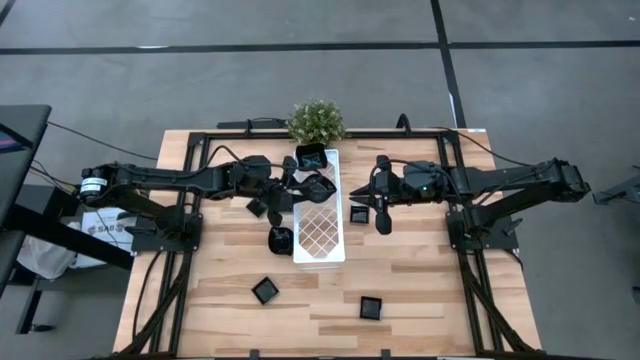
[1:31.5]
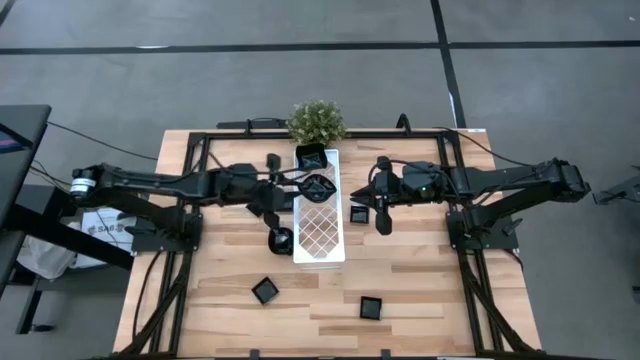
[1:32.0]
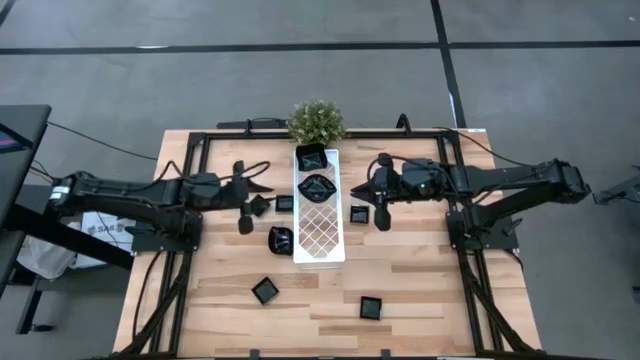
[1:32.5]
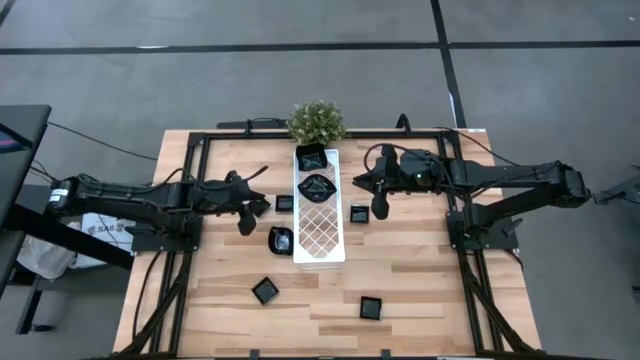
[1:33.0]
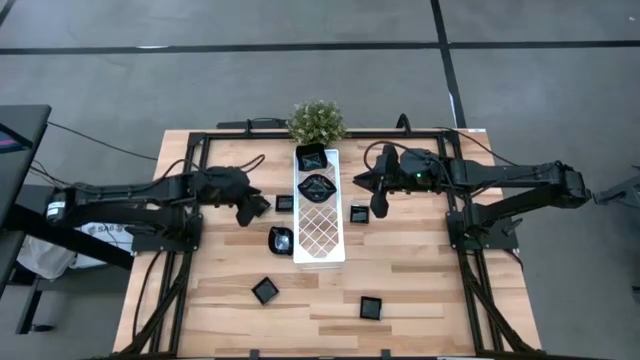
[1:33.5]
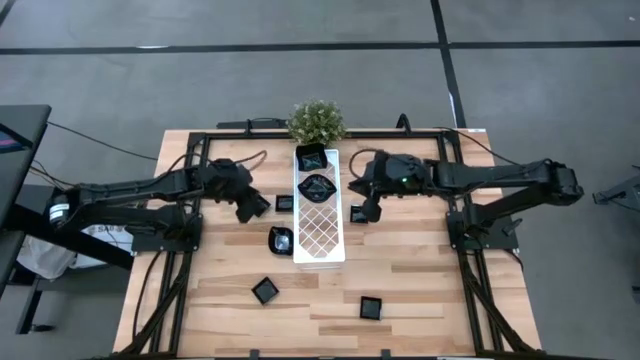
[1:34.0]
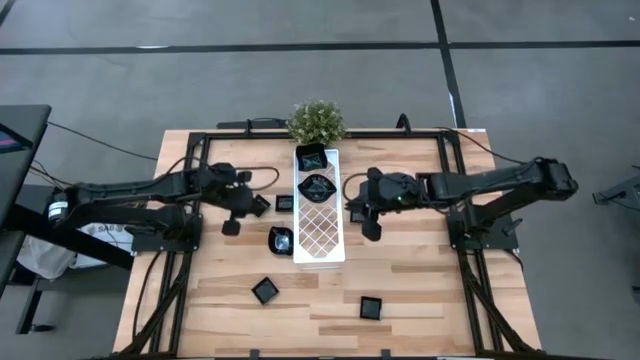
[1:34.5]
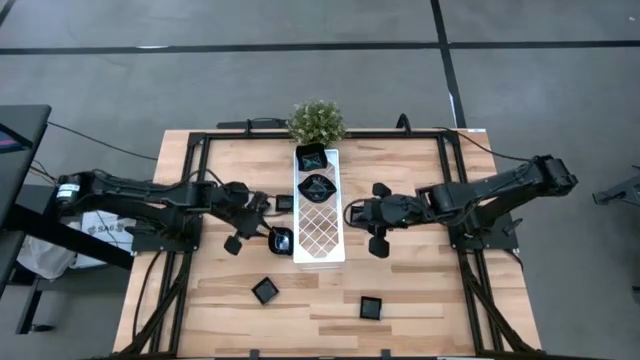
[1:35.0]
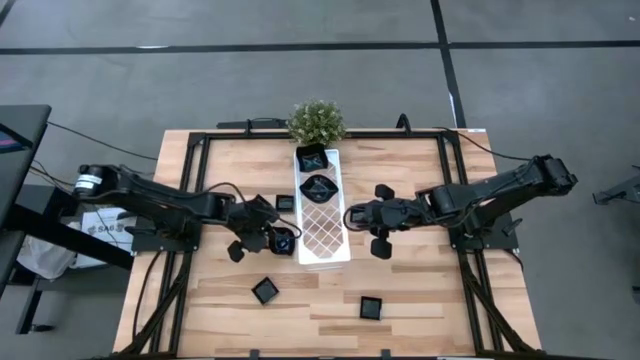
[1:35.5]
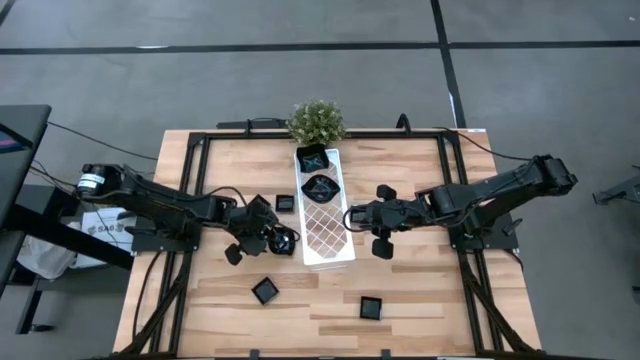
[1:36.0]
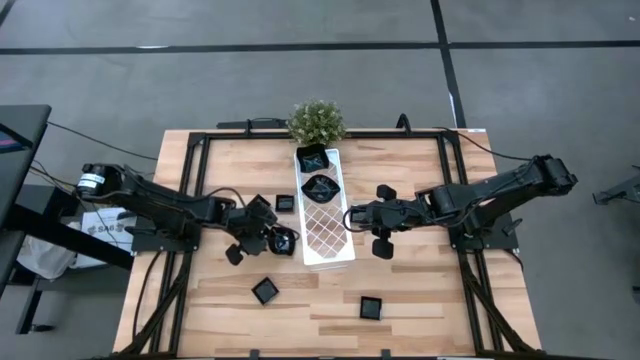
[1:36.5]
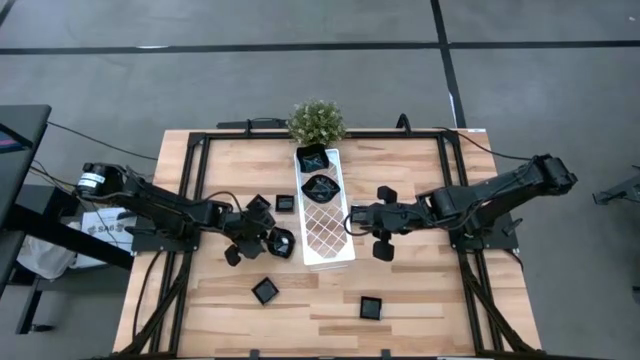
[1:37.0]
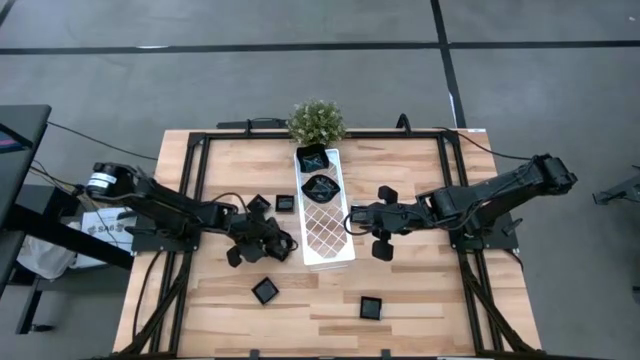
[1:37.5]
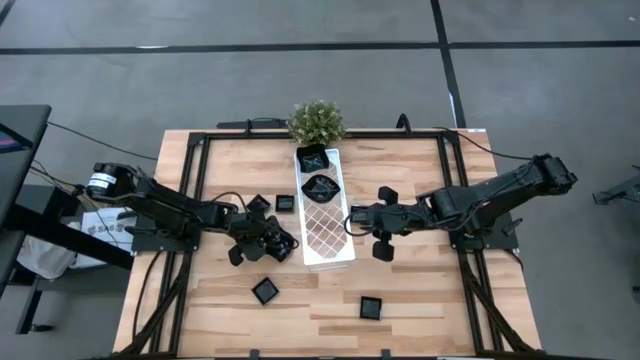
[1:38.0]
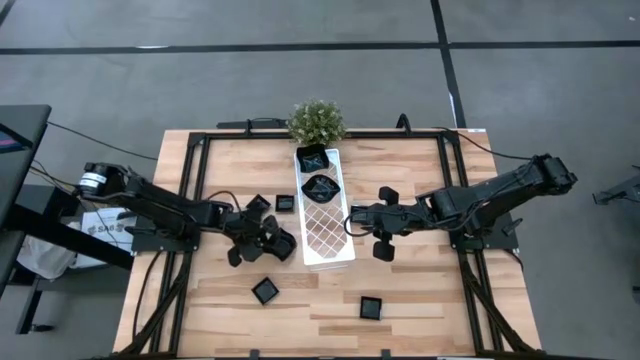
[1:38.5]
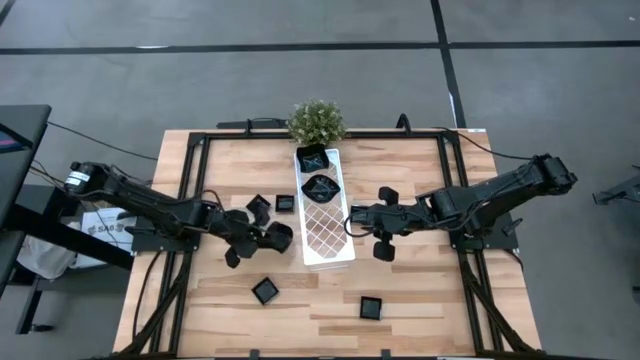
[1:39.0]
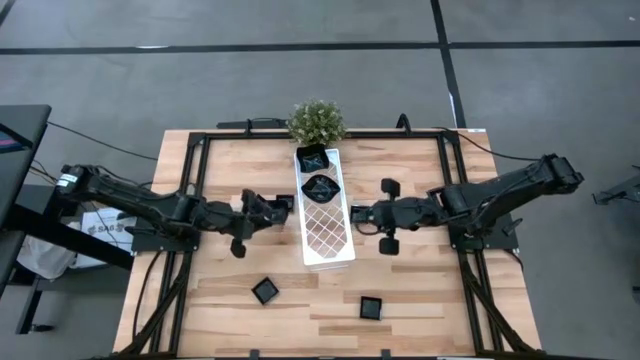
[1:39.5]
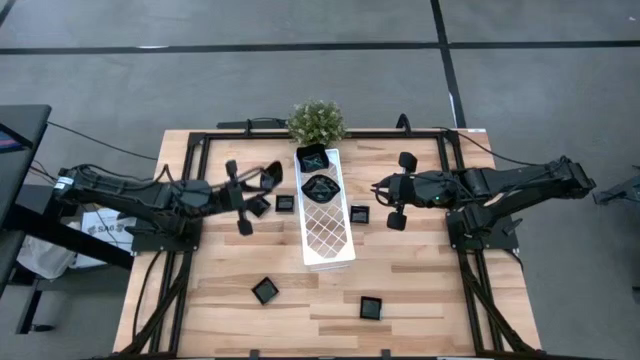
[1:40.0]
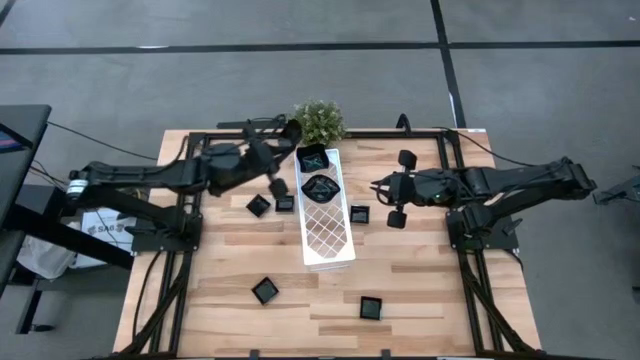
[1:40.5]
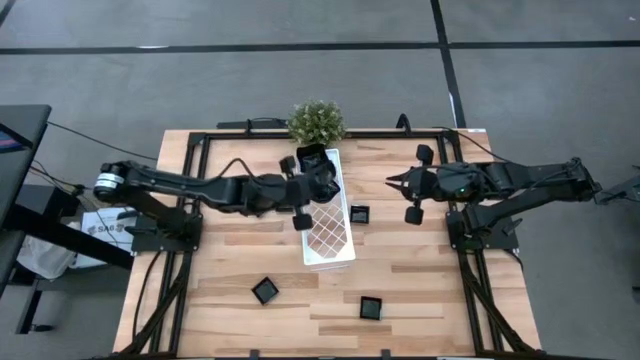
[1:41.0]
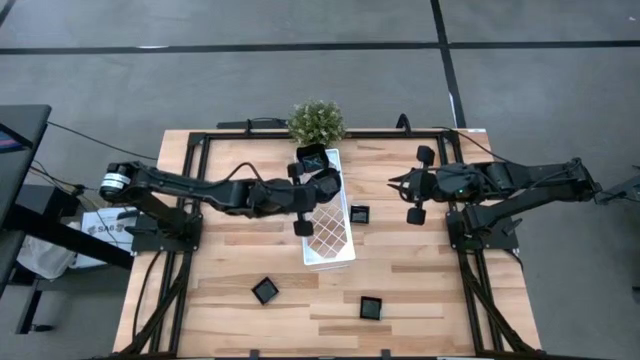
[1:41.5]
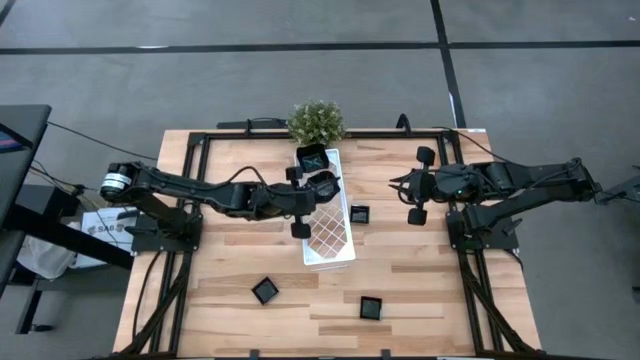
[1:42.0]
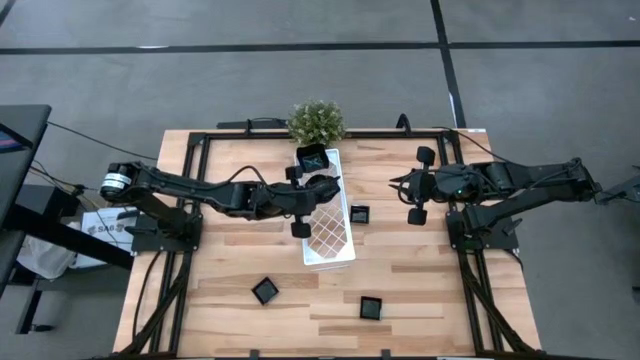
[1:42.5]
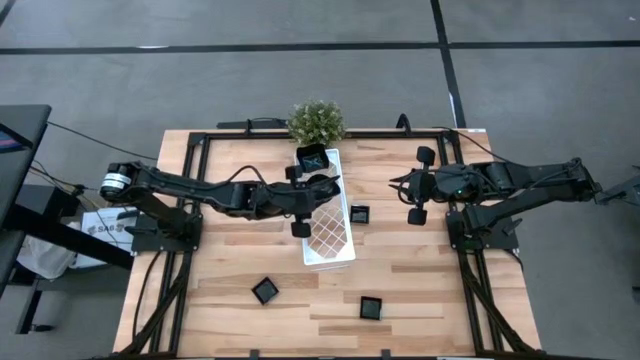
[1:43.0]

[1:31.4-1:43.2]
Task: Pick & Place Mini shaped plates
Stack the leaf-shaped plate on the other leaf-shaped plate on the shelf

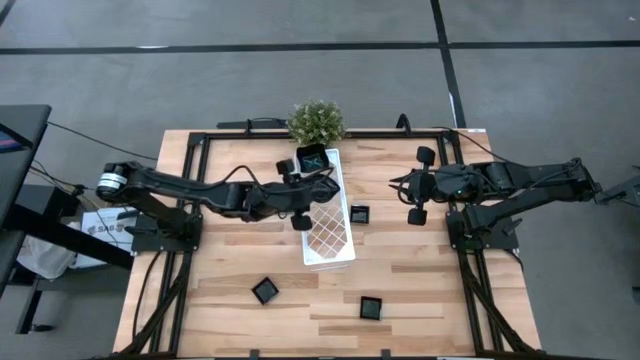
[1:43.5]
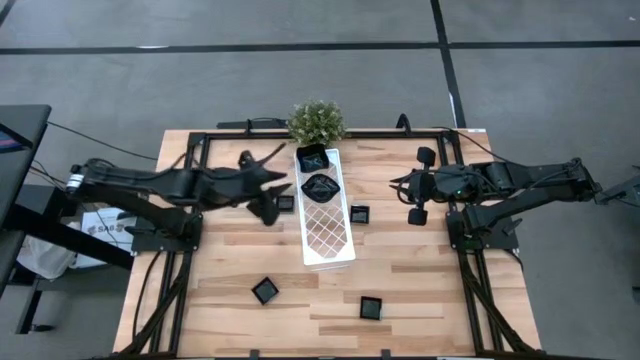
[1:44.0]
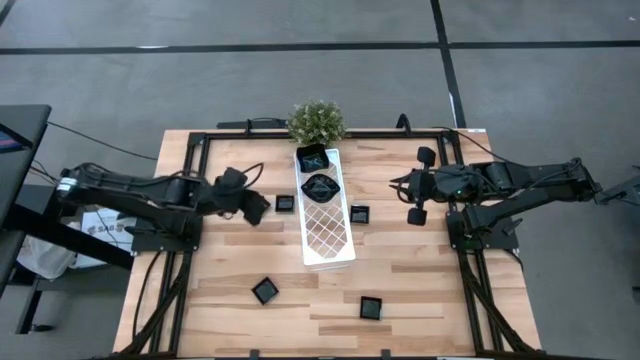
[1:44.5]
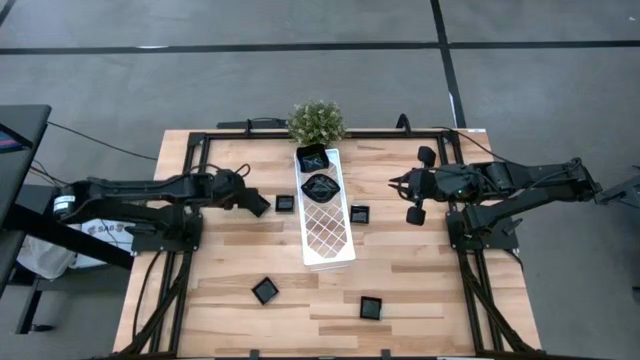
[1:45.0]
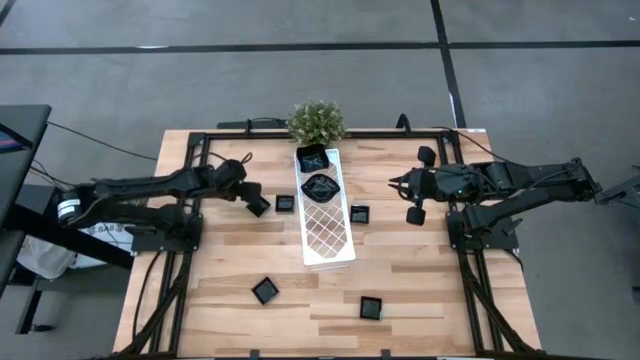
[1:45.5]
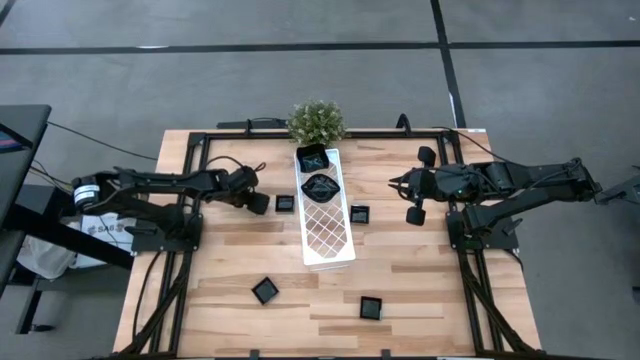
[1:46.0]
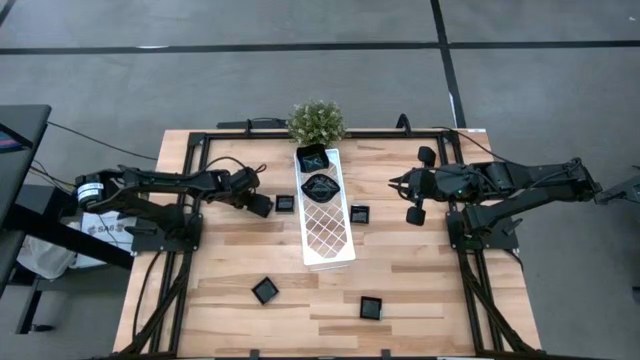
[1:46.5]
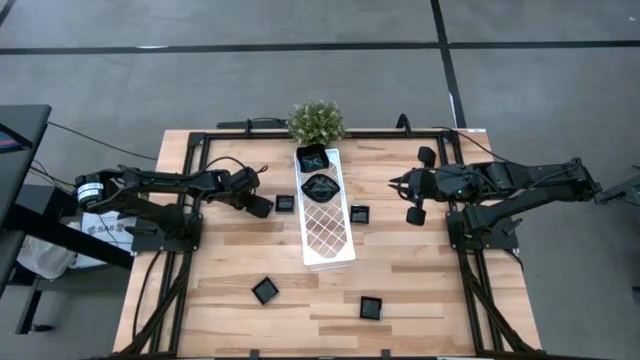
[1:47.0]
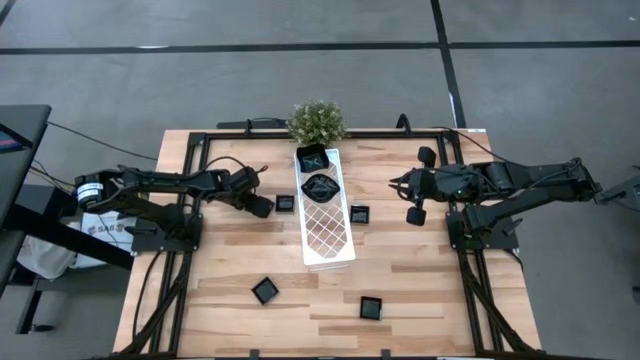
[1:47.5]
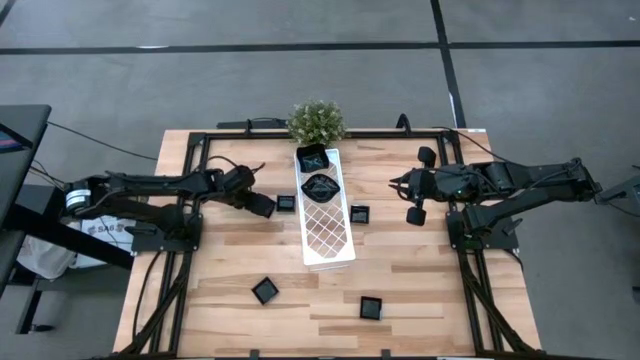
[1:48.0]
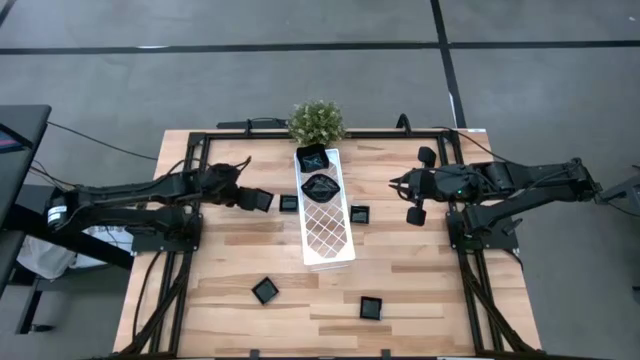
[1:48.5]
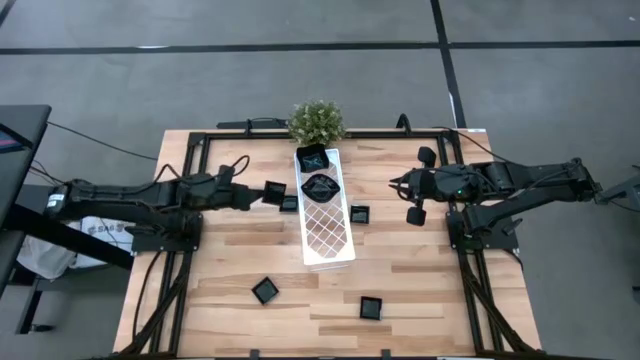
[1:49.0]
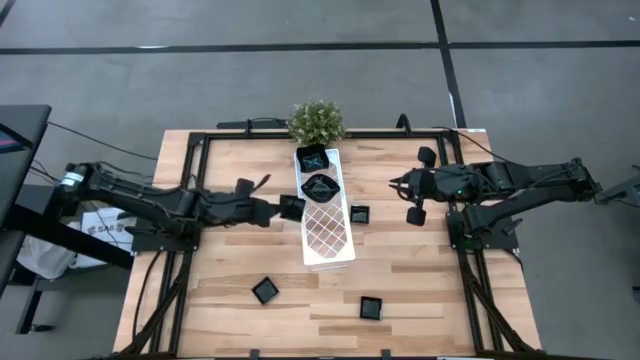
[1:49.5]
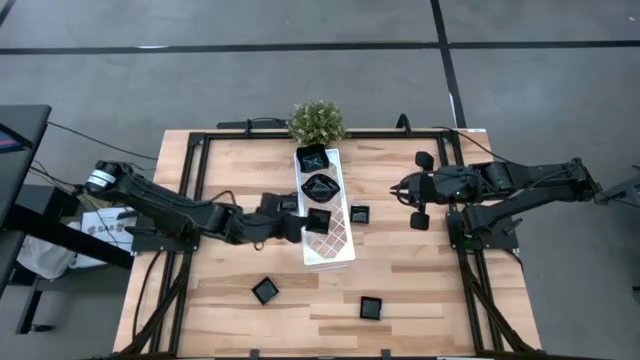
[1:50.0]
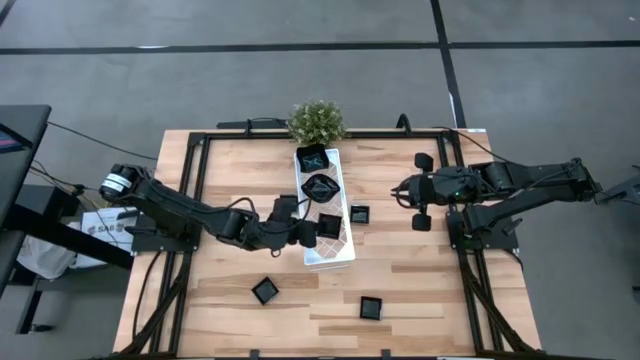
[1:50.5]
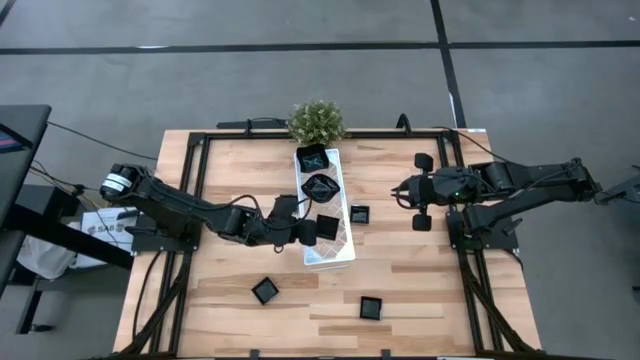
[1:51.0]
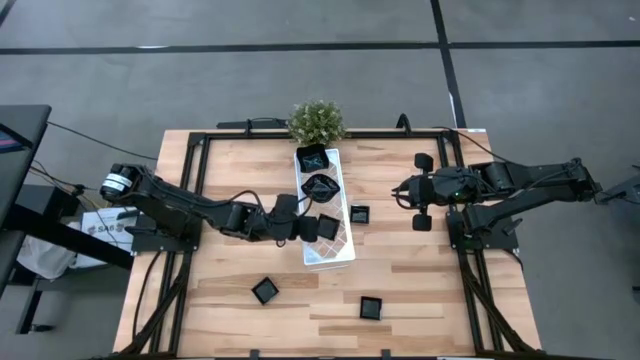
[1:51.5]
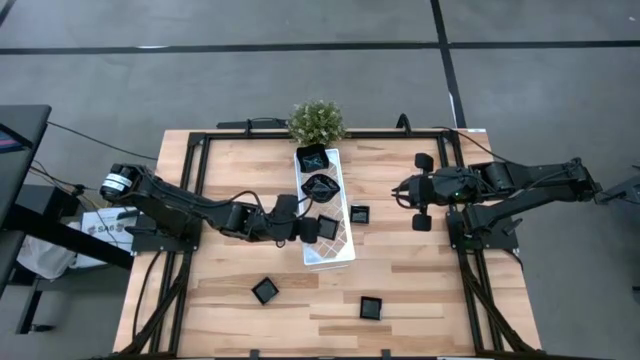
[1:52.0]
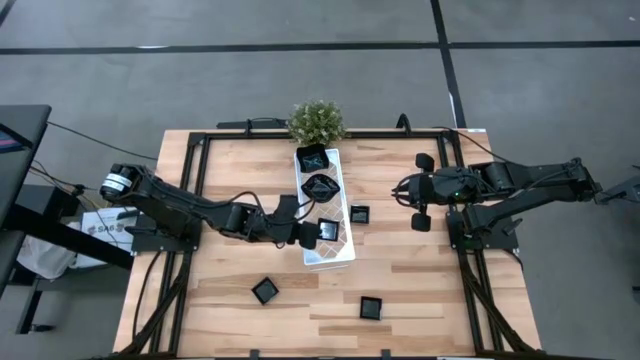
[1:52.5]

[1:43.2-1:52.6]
Put the square plate on the shelf
